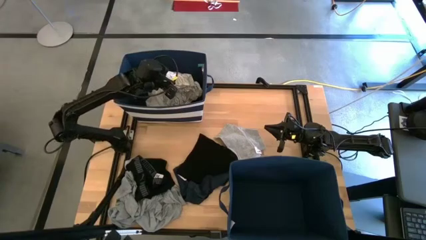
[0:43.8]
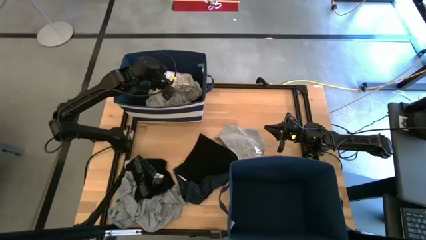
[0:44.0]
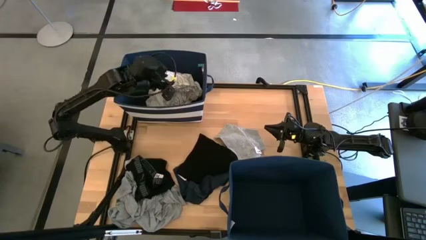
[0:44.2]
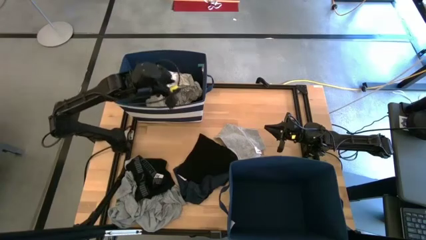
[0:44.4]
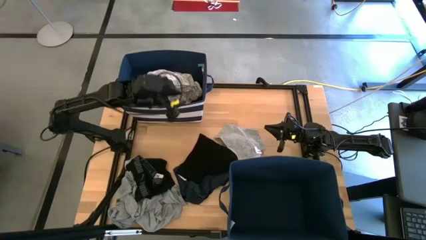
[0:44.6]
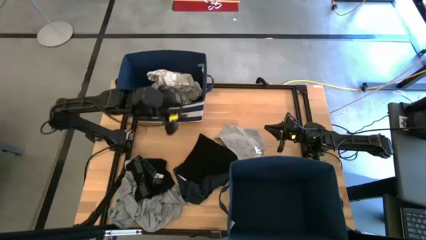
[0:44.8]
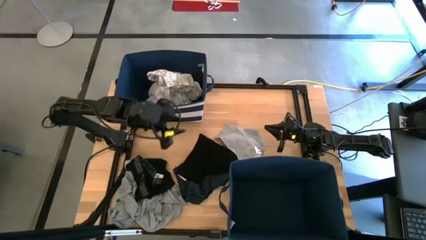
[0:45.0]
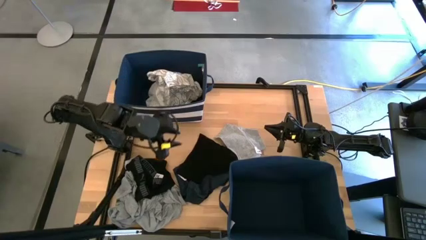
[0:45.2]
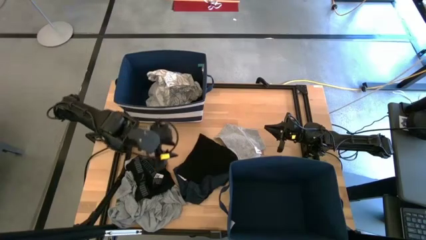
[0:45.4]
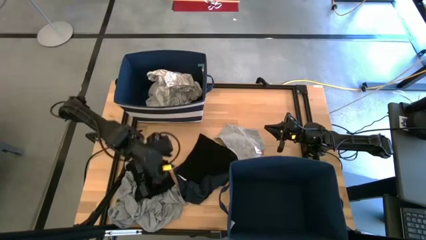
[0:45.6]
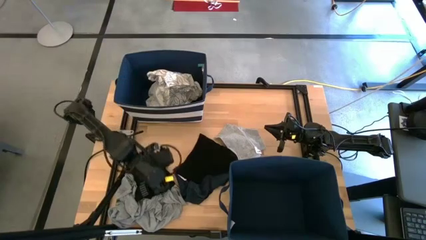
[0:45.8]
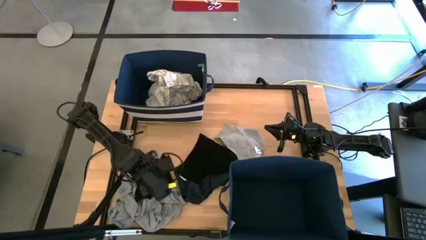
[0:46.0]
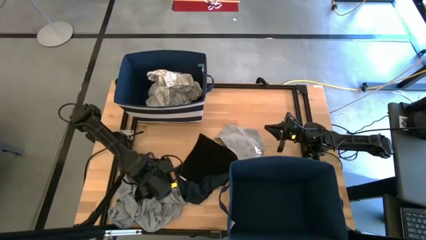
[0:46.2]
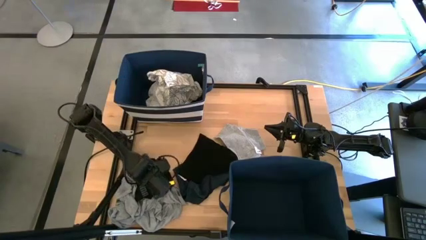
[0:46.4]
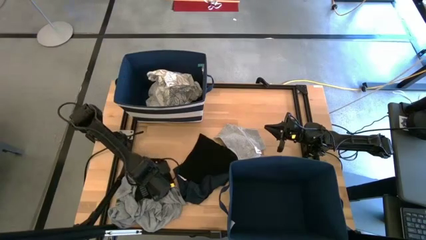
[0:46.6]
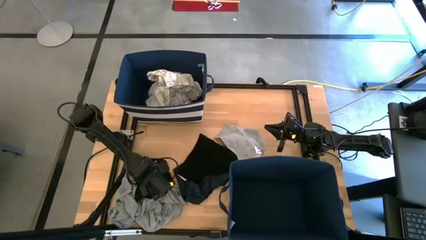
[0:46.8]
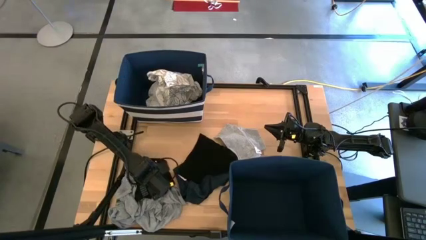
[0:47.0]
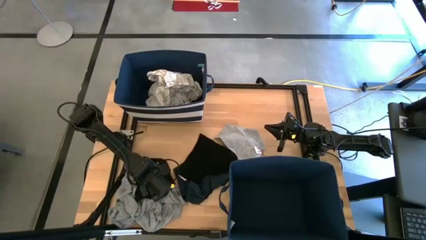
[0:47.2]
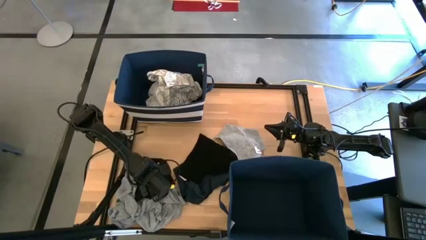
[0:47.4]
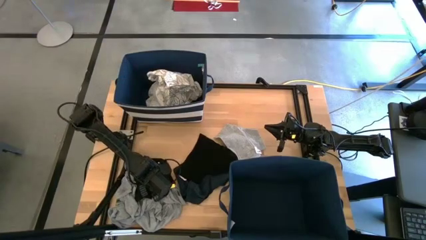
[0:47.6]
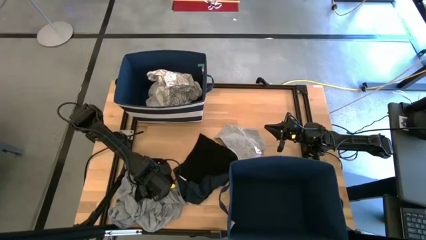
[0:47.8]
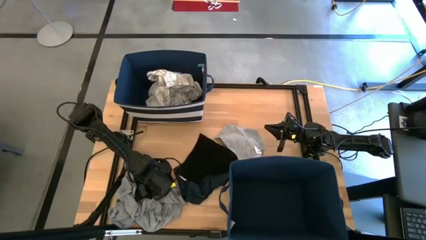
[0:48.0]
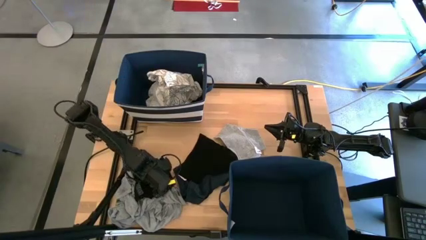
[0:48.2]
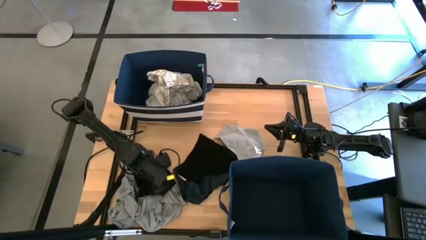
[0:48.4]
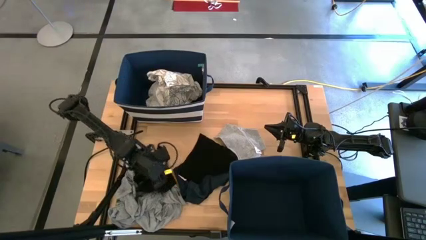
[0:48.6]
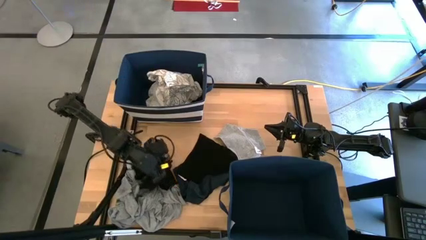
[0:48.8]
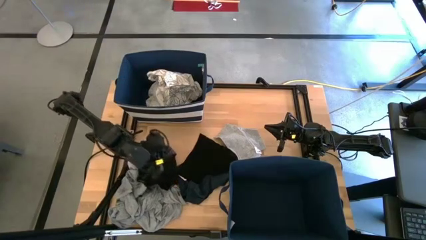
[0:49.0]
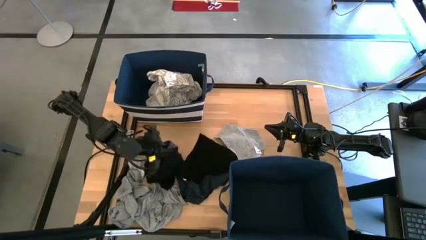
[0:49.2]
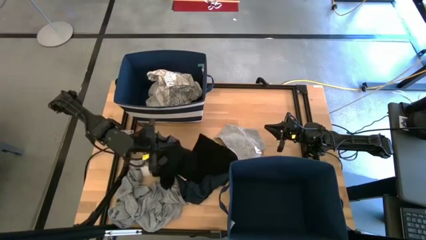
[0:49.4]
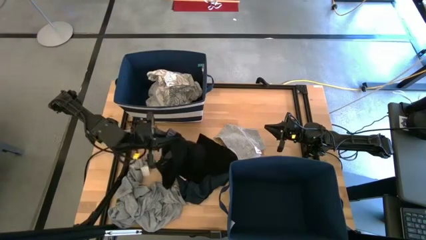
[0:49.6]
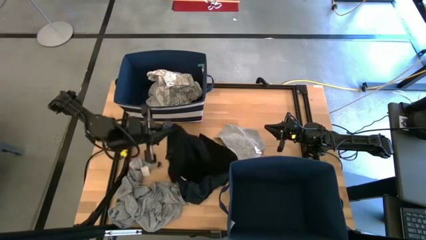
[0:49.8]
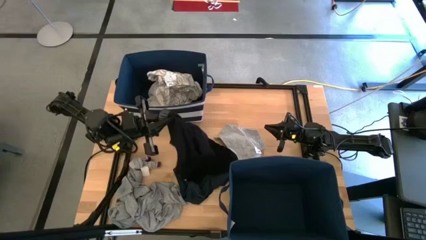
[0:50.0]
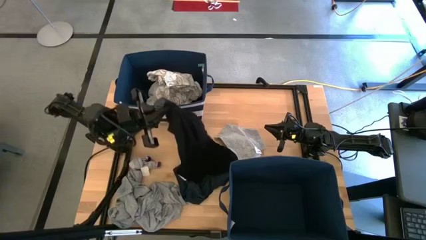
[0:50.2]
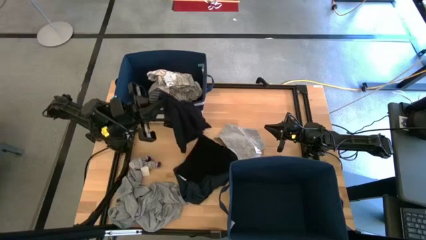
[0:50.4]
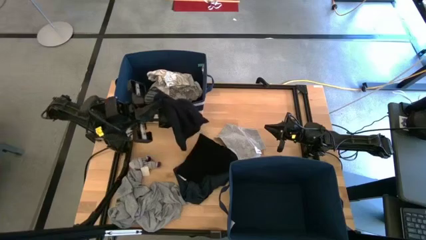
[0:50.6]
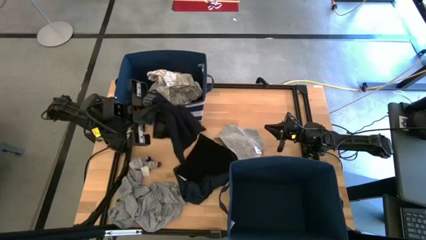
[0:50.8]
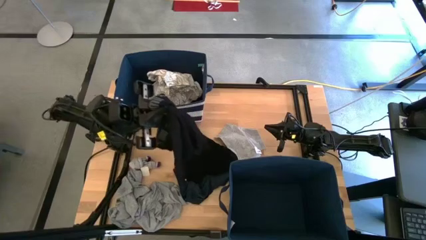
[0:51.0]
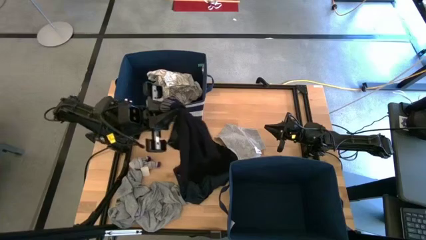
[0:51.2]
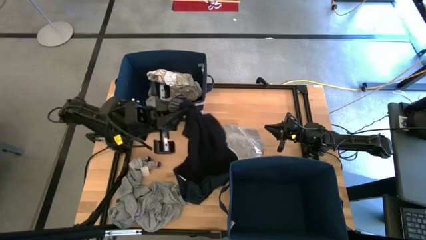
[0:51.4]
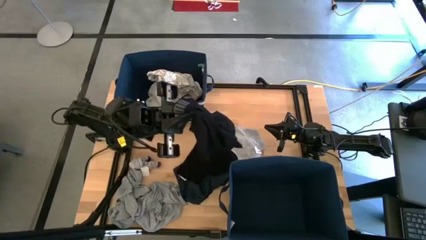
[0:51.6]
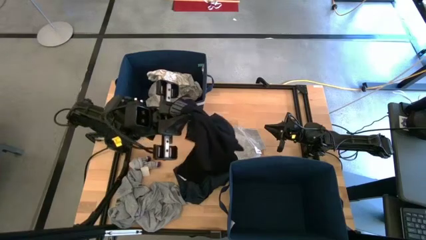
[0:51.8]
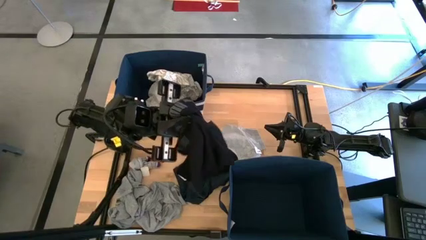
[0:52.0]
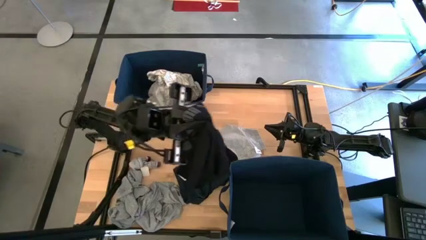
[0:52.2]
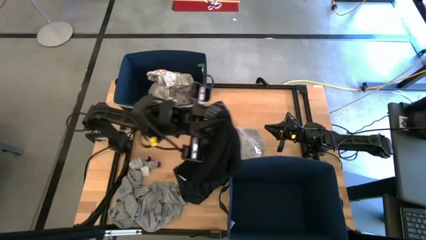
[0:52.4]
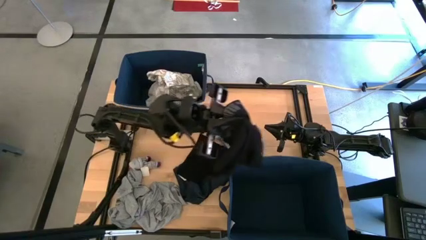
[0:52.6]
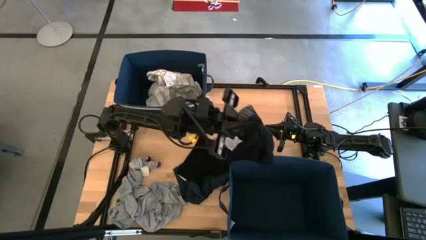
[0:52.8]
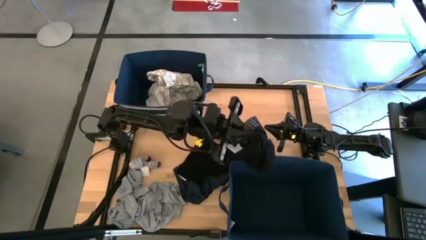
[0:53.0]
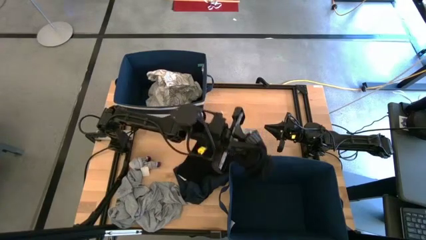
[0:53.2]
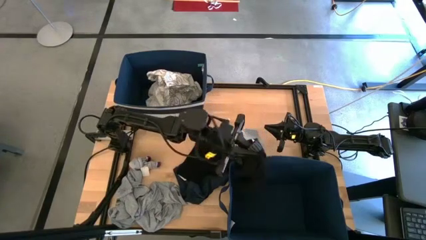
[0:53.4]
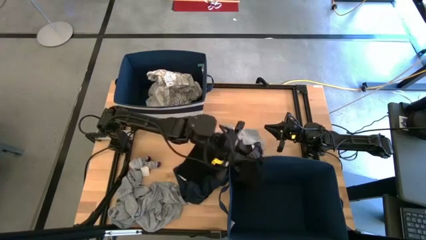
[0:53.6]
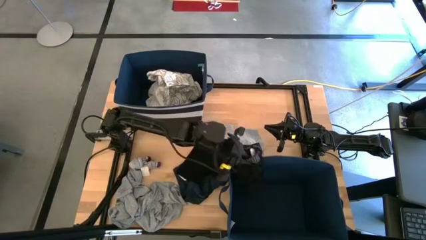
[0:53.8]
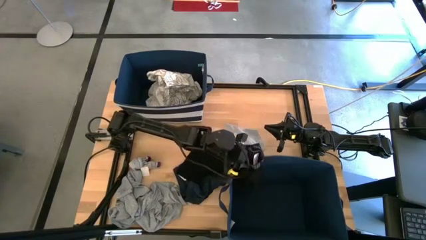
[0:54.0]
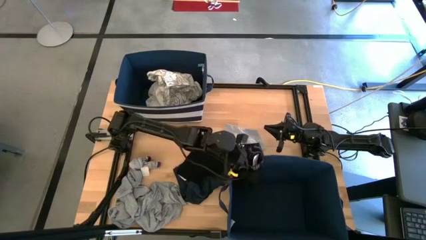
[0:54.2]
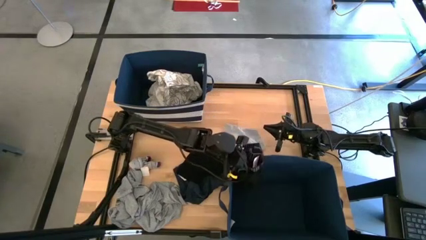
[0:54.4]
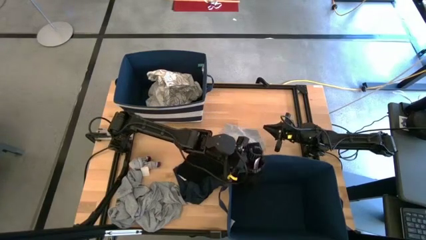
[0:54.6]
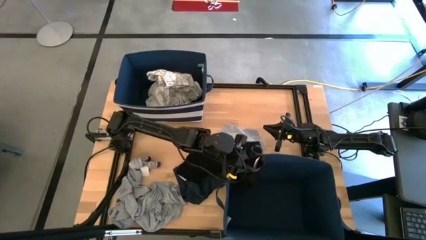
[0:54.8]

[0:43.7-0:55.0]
Task: Sort clothes
Put the black boxer into the bottom blue laundry organizer

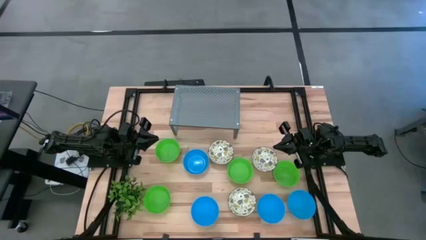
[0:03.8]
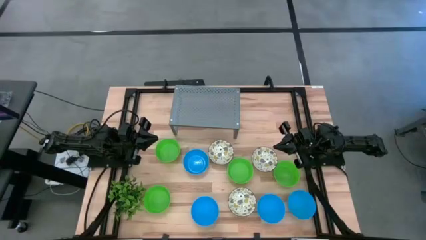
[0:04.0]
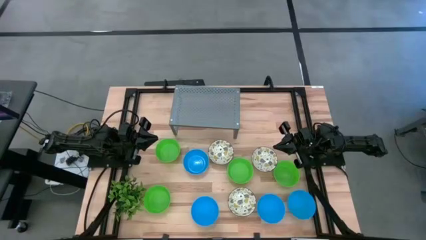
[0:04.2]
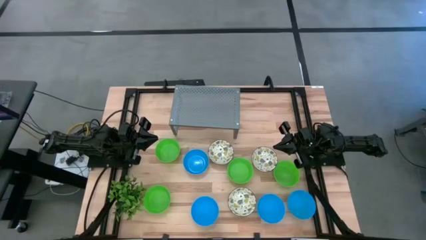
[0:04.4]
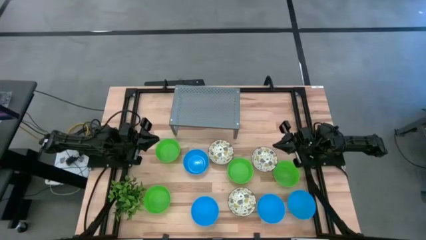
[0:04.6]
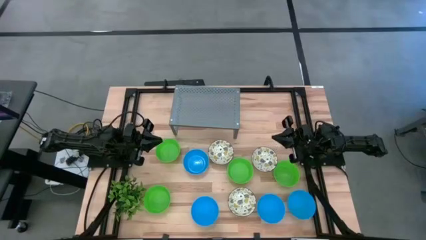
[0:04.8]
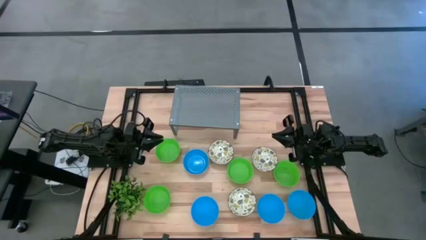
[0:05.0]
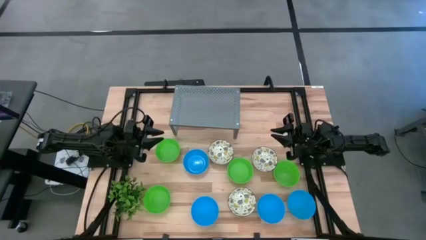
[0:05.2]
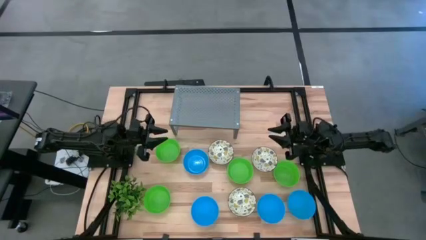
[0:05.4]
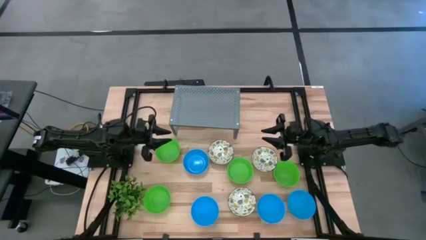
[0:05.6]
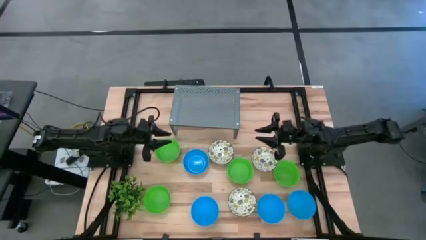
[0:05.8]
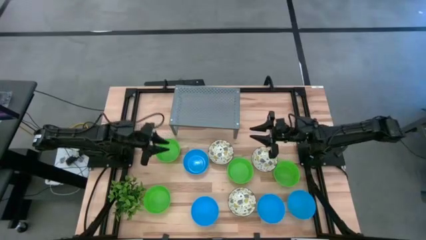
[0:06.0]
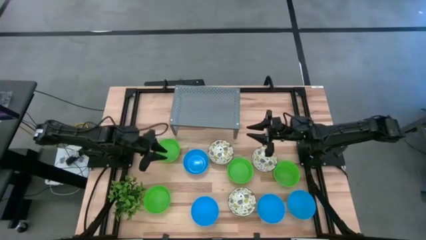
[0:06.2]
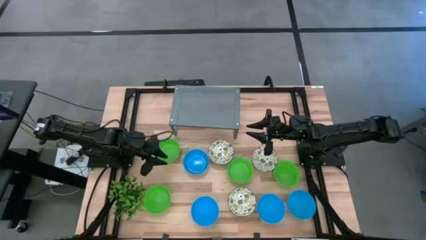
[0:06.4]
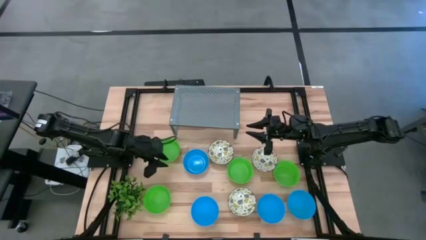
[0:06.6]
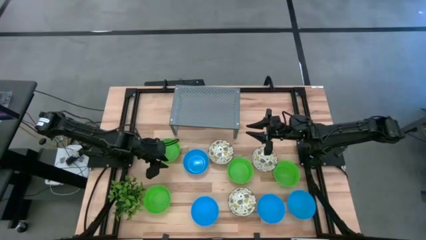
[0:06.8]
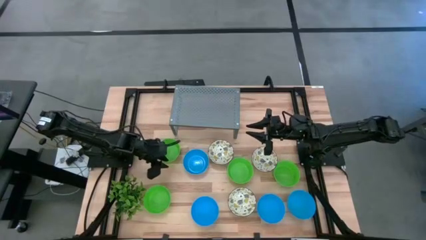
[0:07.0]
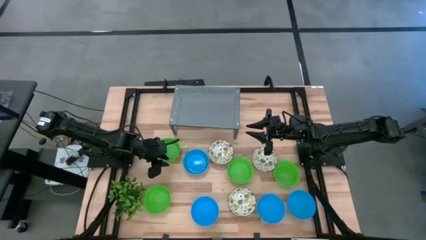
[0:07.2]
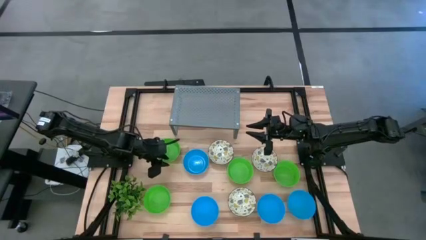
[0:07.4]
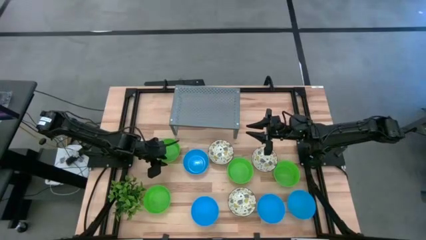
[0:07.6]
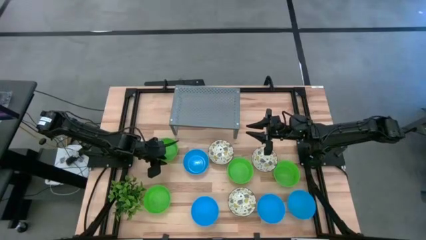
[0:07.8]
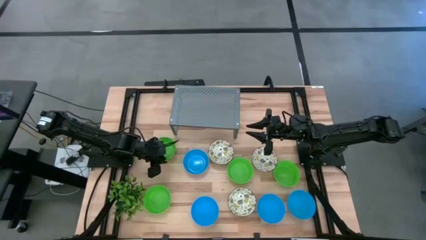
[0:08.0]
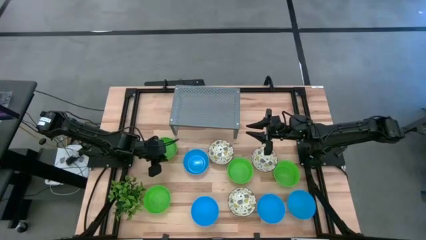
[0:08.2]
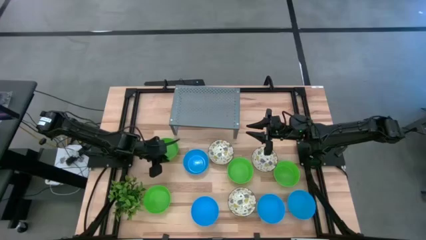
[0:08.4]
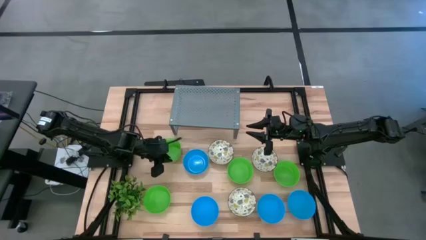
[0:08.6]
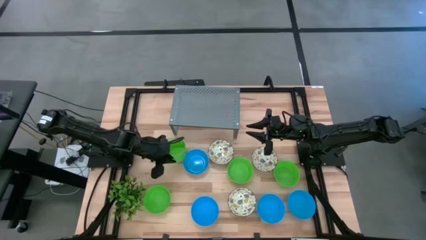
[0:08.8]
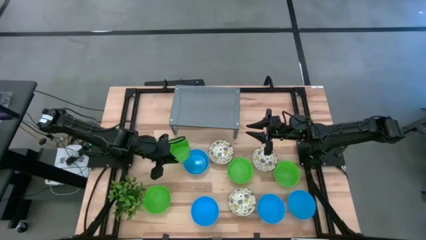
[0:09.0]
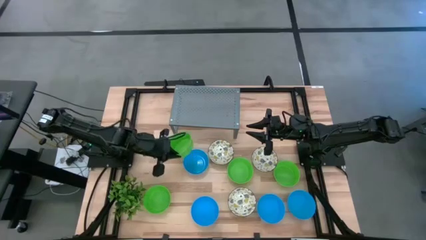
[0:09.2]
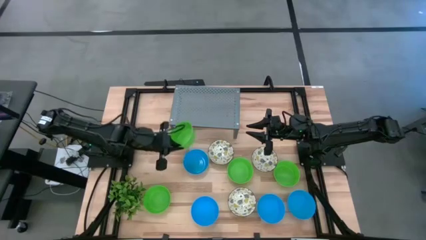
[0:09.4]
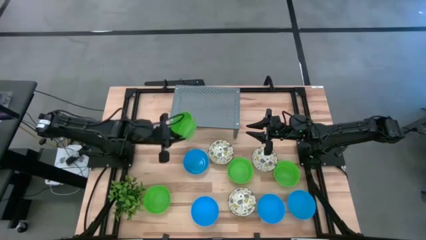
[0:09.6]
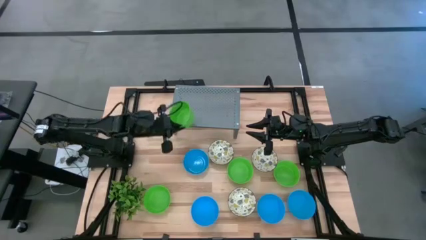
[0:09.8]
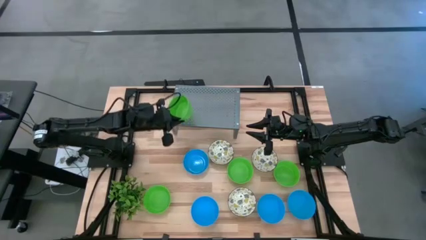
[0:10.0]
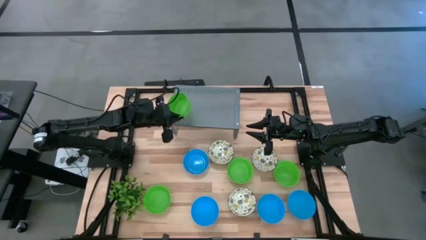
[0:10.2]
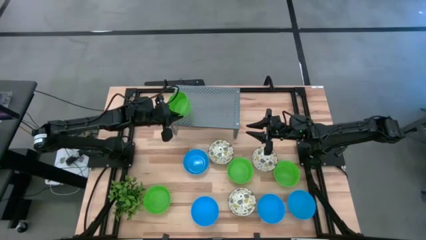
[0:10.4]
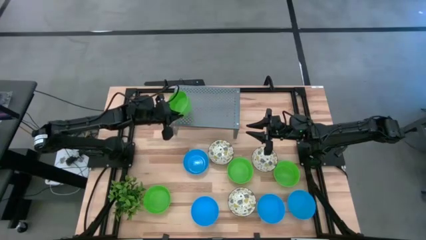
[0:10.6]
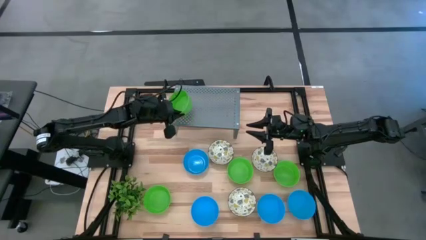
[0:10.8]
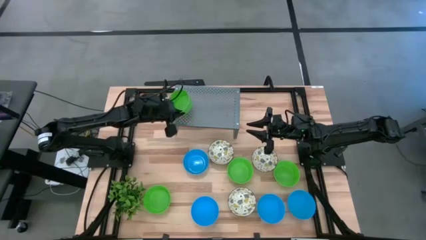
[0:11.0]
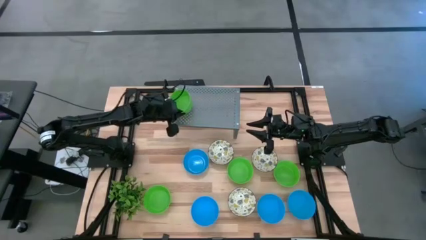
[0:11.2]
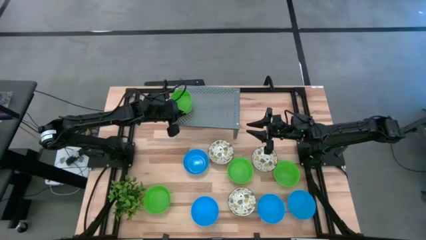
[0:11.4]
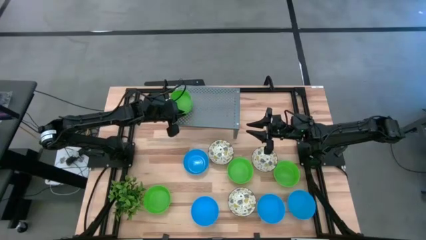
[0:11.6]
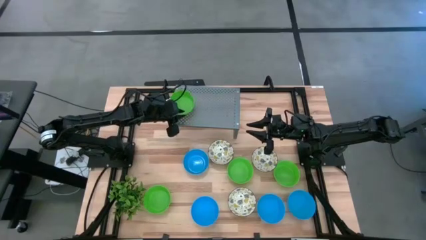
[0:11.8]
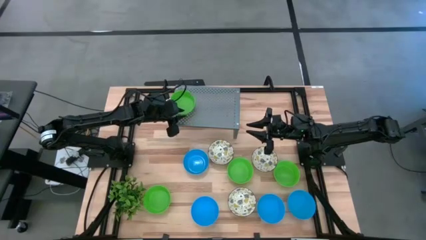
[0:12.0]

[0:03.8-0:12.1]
Task: Pick & Place Mini bowls
Put the green bowl on the shelf
